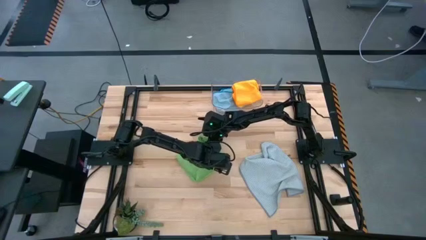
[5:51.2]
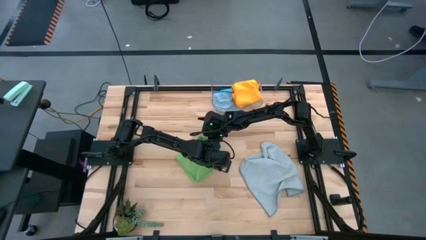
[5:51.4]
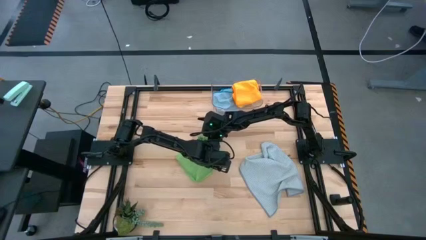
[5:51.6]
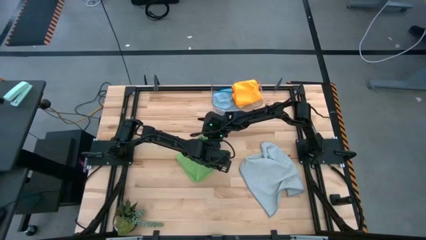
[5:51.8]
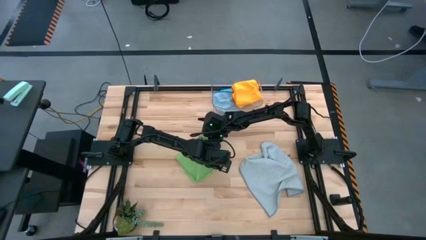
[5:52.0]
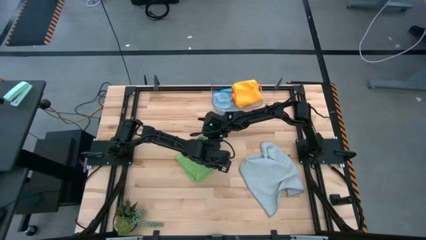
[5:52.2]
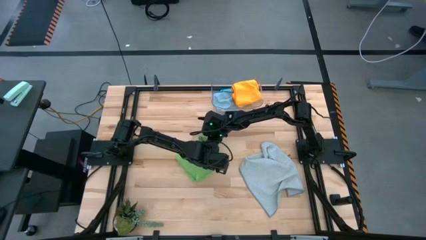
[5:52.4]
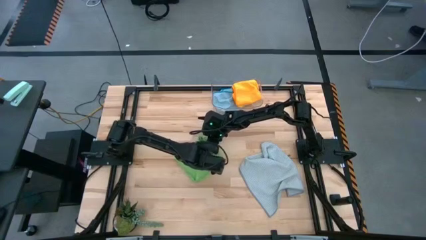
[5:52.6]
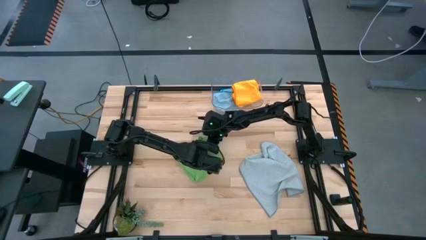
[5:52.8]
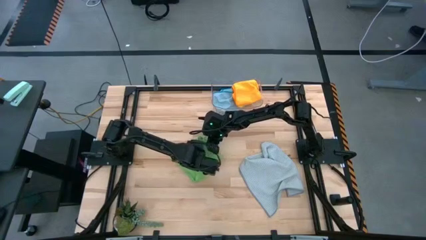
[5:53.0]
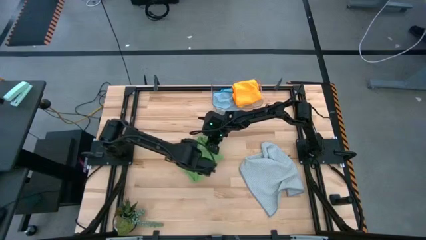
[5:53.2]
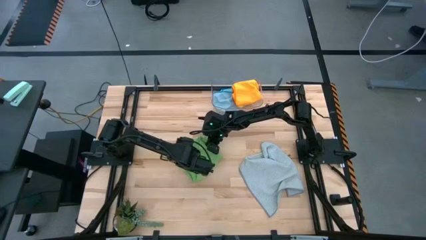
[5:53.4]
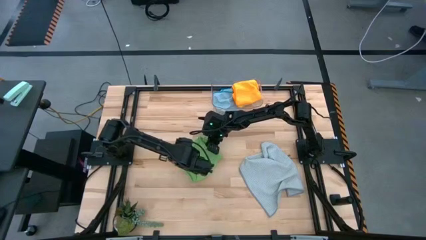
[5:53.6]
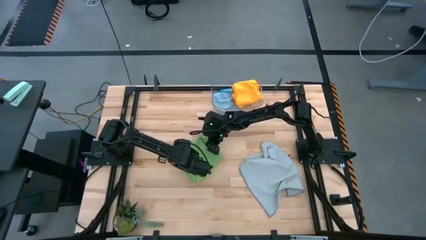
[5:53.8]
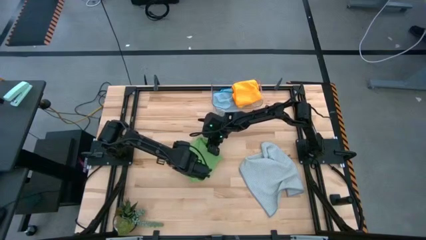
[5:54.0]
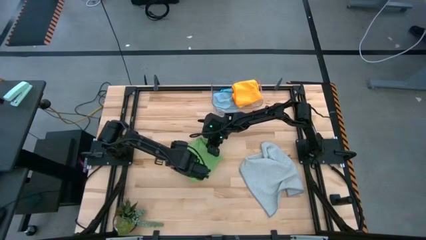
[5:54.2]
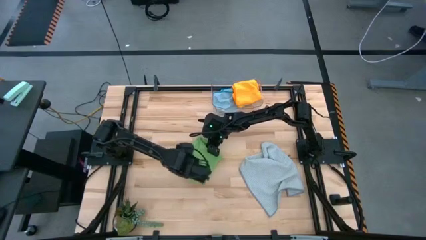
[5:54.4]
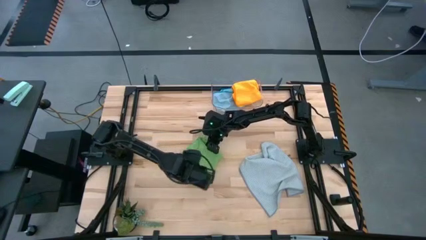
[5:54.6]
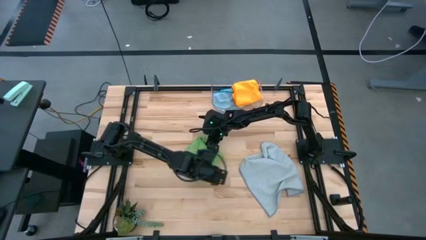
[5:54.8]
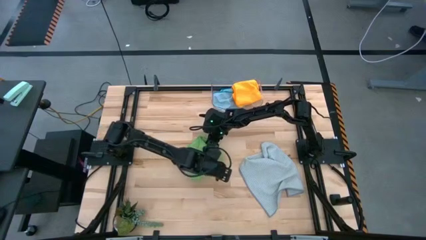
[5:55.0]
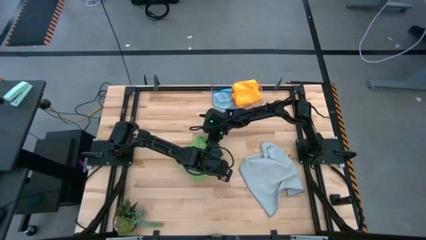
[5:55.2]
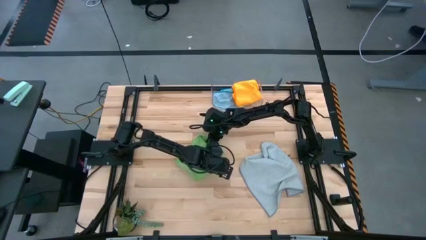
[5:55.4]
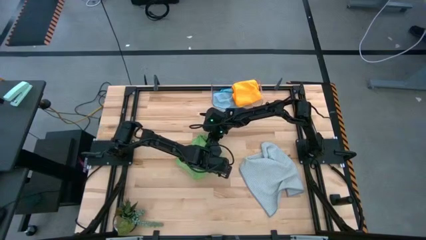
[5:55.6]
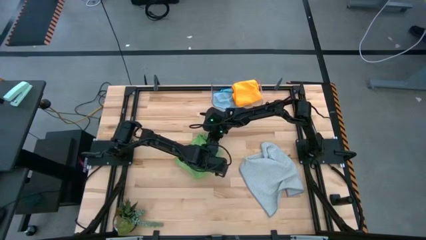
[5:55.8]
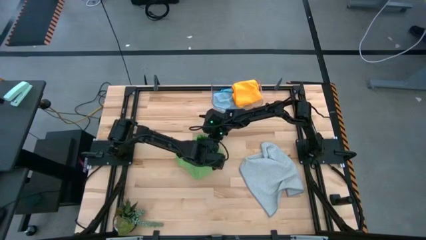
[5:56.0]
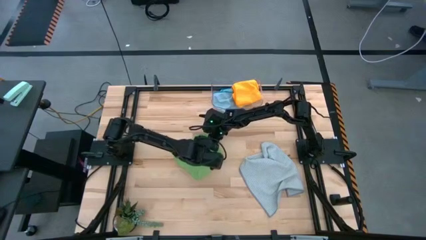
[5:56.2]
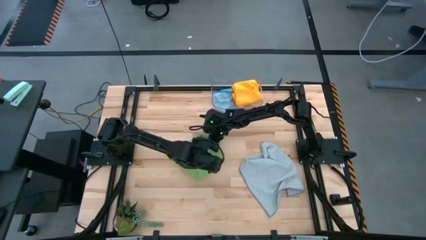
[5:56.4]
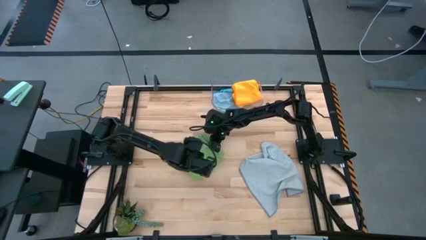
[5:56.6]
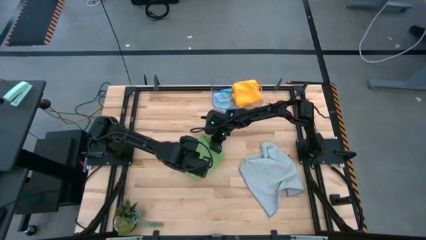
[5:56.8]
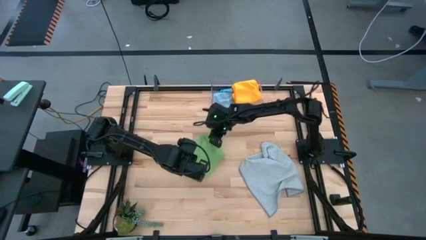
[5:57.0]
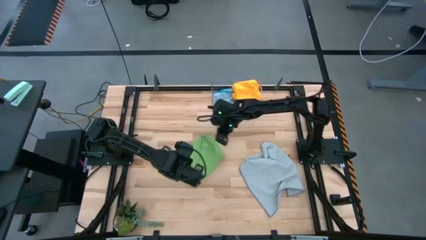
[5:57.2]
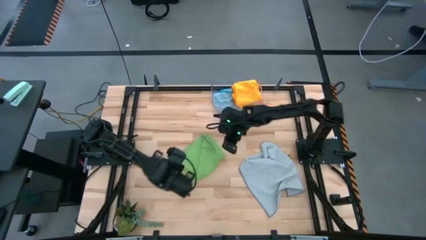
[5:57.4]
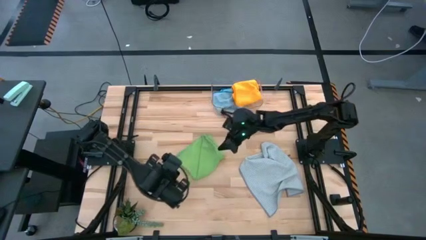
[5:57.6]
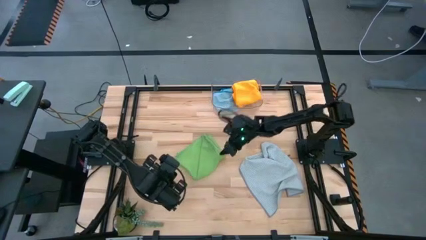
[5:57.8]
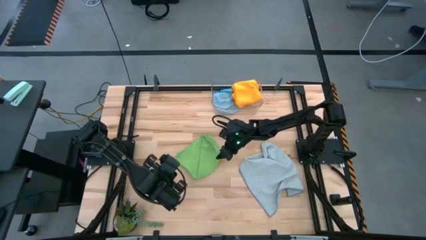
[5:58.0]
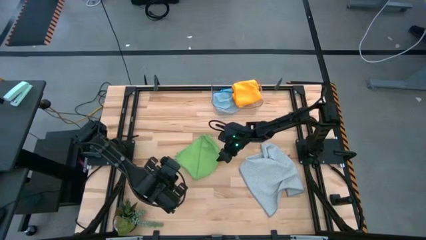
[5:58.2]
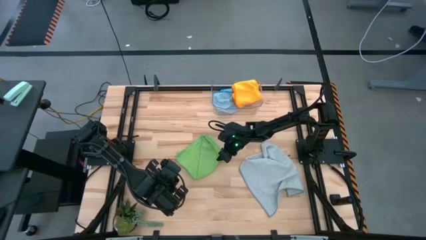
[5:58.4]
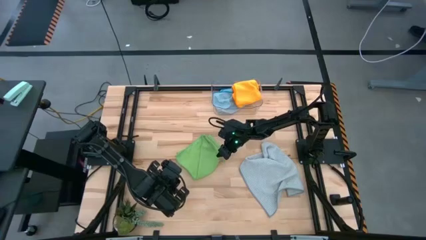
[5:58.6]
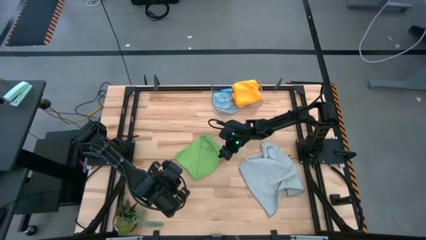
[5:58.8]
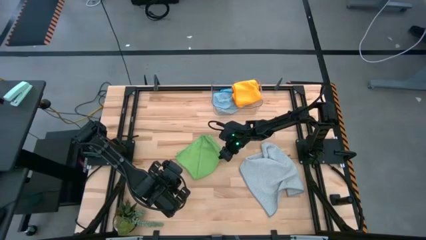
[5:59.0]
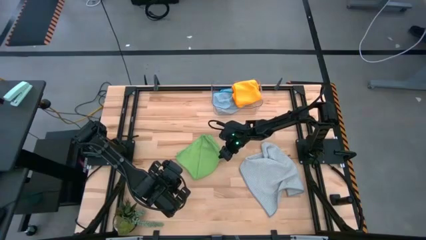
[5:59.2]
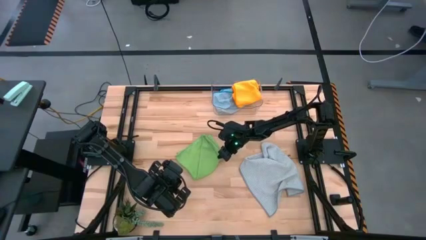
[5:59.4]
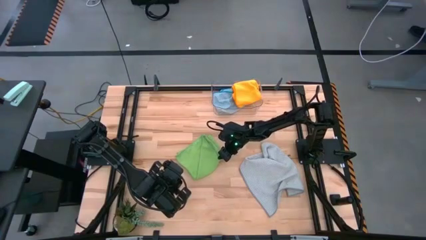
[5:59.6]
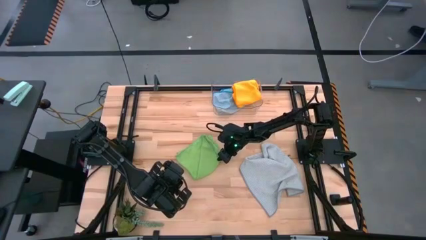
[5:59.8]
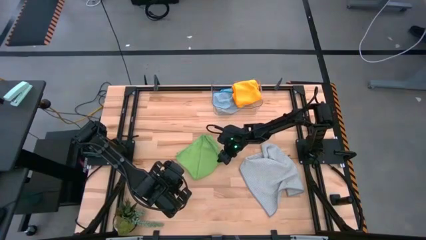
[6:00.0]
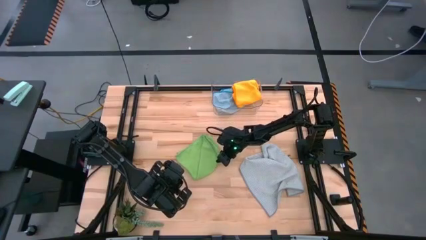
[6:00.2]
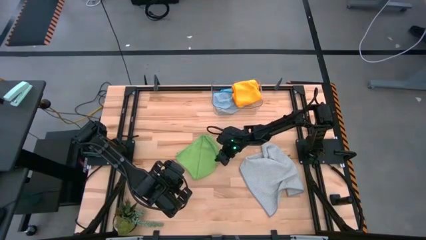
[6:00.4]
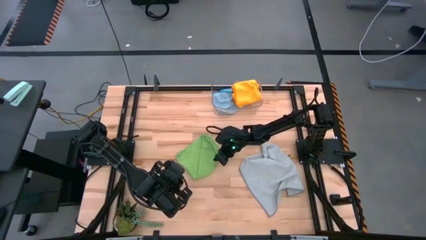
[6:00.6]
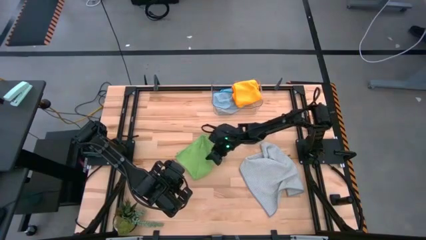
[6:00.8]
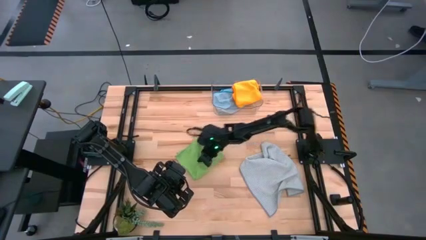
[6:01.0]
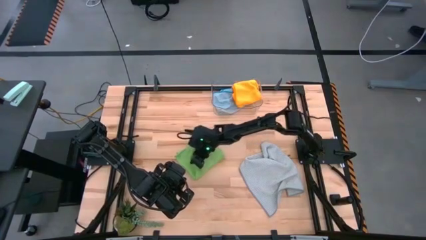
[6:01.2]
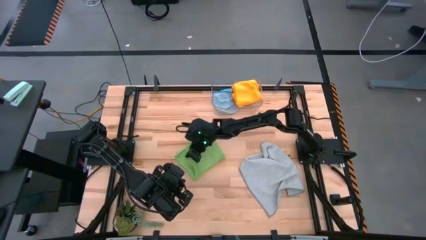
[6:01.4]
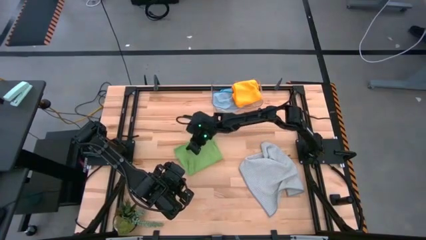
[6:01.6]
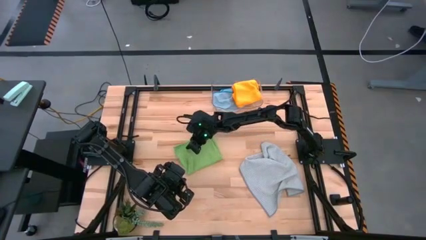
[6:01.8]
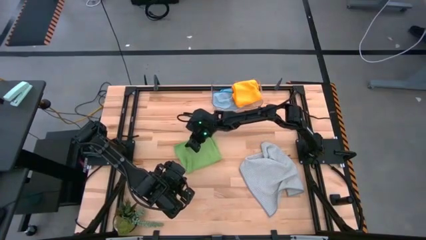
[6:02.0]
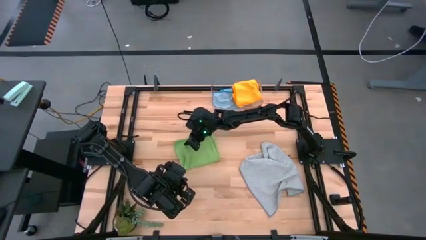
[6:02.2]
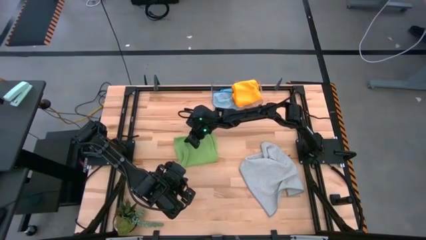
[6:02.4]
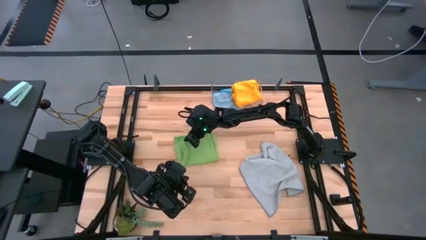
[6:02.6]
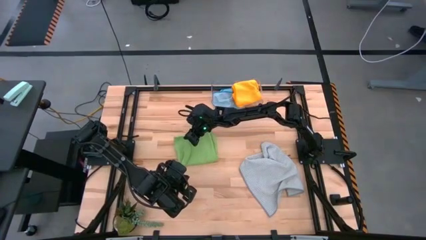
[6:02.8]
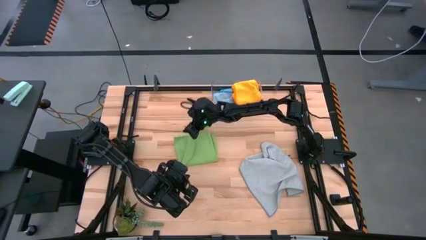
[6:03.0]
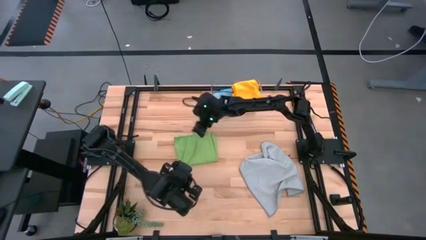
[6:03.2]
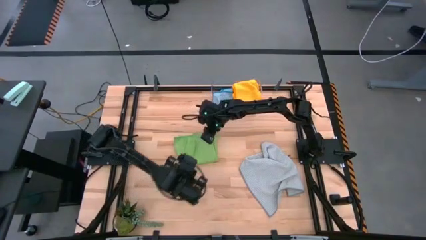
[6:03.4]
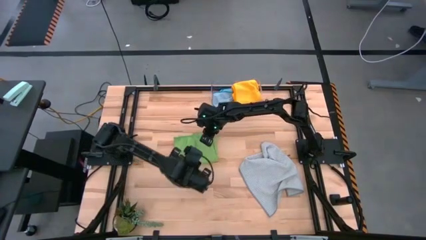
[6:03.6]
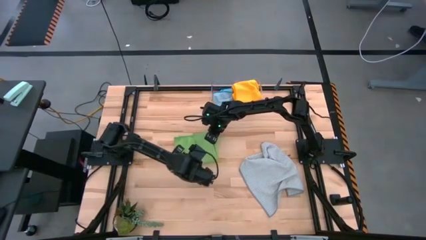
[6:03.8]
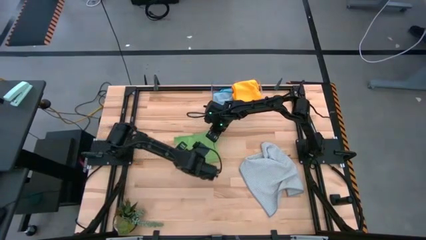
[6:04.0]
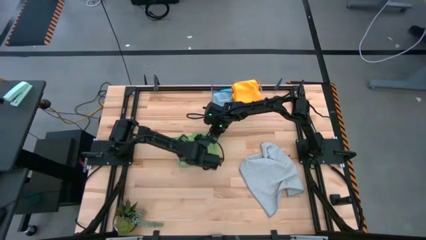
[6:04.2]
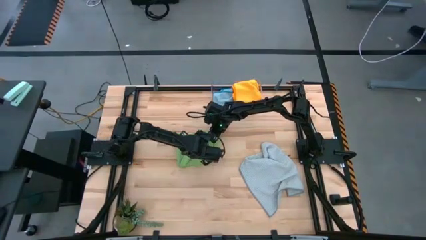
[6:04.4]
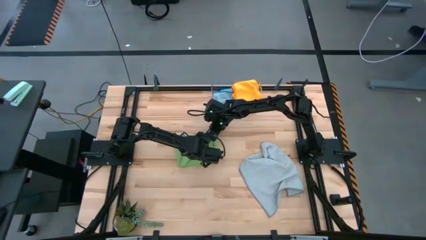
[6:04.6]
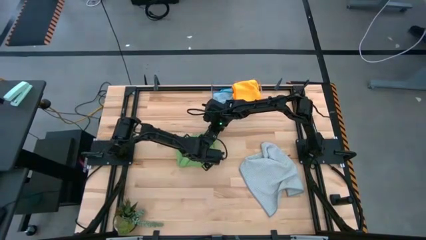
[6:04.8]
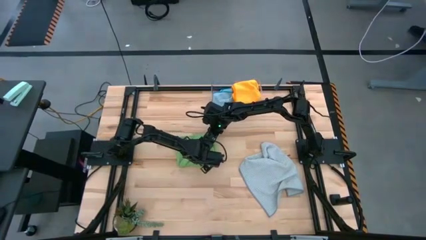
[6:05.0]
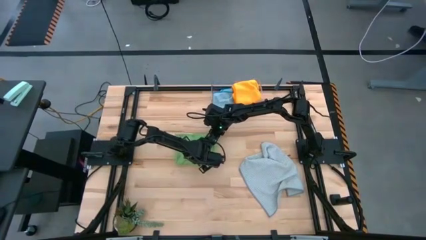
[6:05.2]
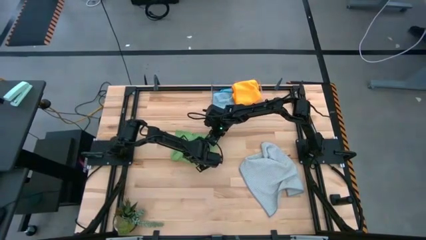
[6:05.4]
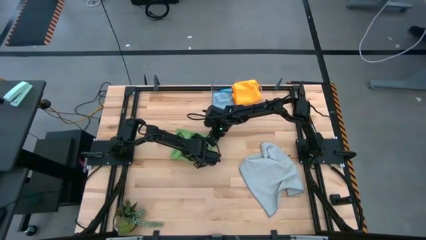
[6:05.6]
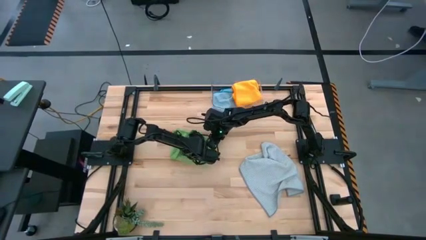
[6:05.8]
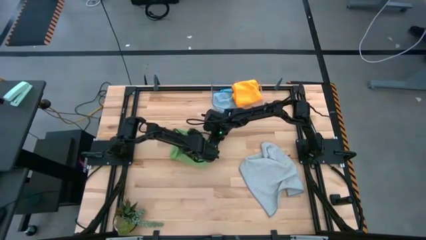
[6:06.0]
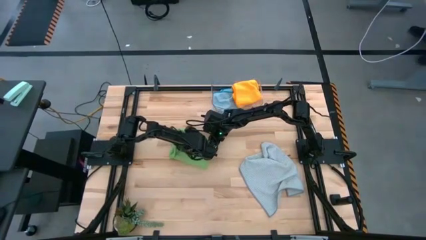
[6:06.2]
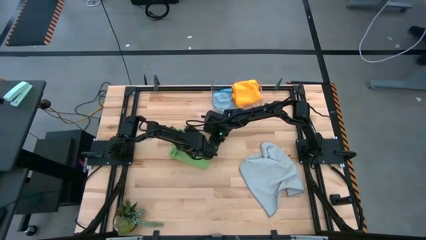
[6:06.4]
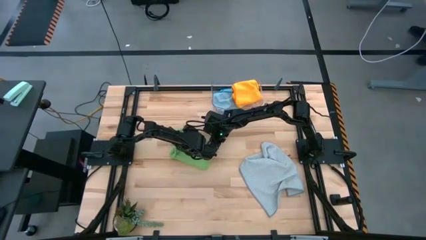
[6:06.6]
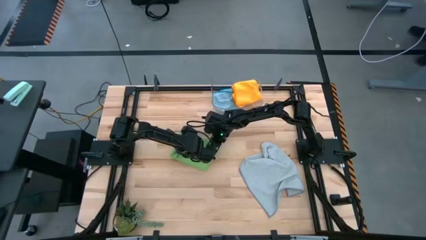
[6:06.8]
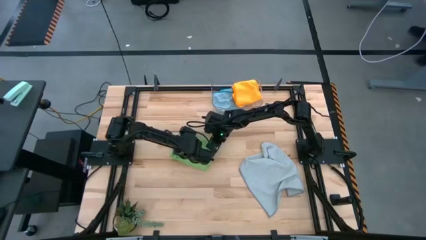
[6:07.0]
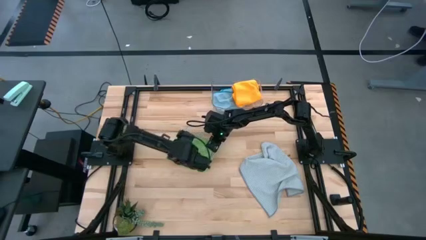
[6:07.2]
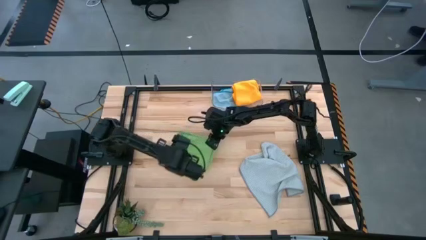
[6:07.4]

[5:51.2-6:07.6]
Task: Fold microfiber towels
Fold the green microfiber cloth
